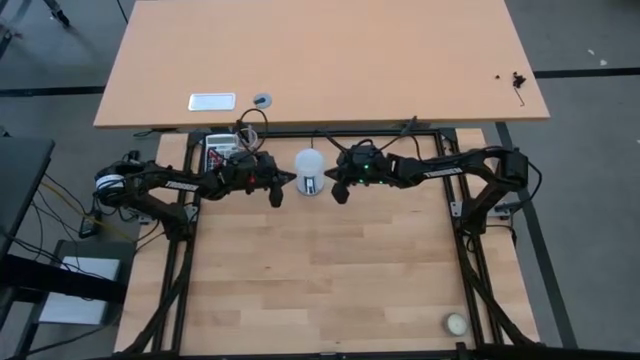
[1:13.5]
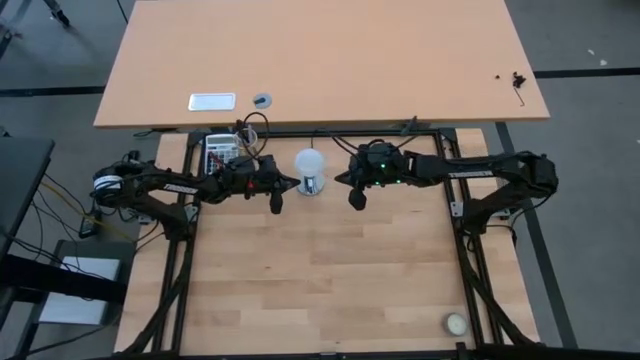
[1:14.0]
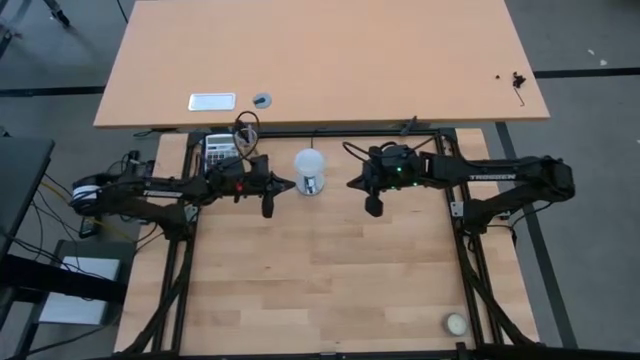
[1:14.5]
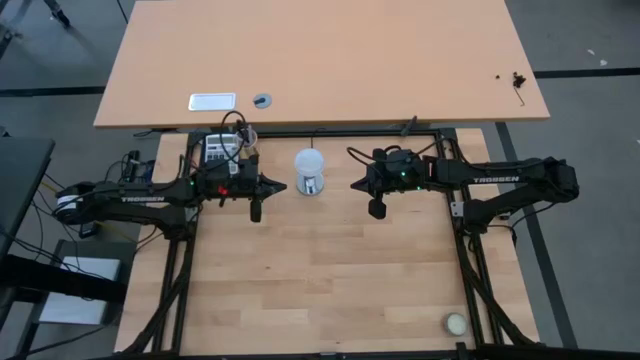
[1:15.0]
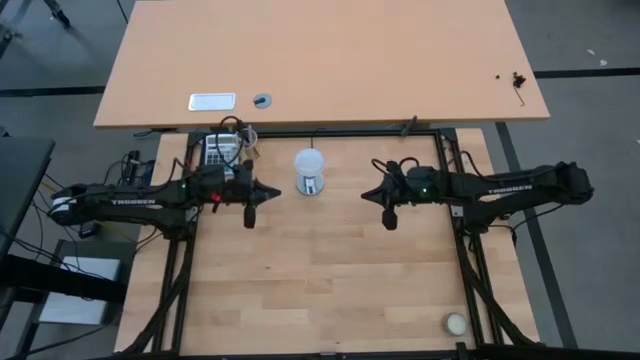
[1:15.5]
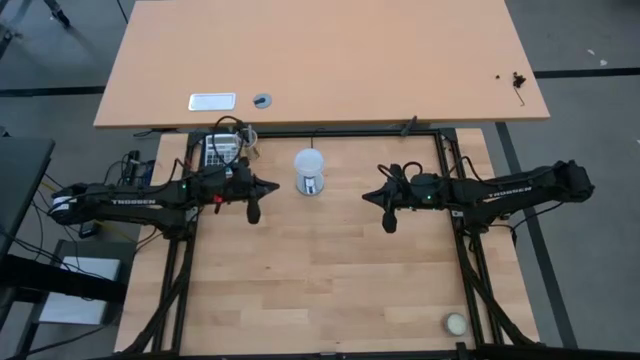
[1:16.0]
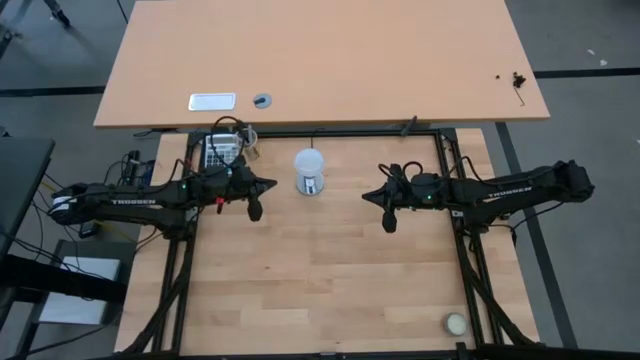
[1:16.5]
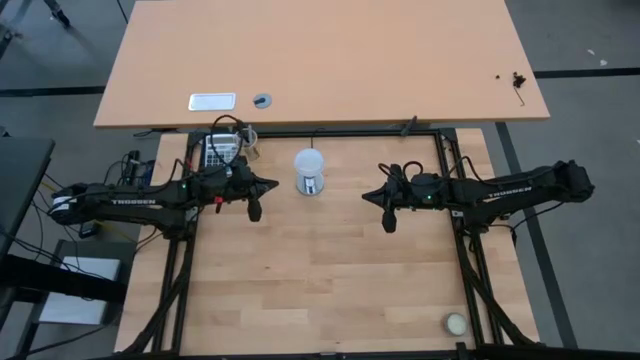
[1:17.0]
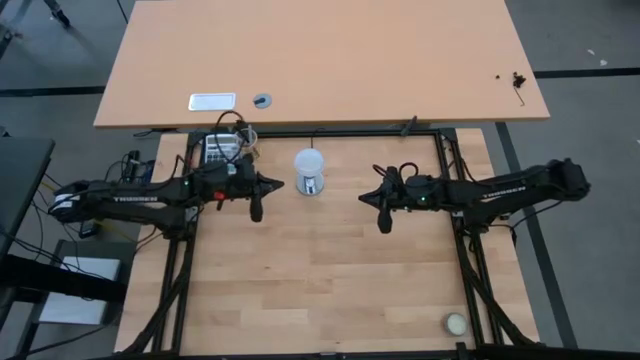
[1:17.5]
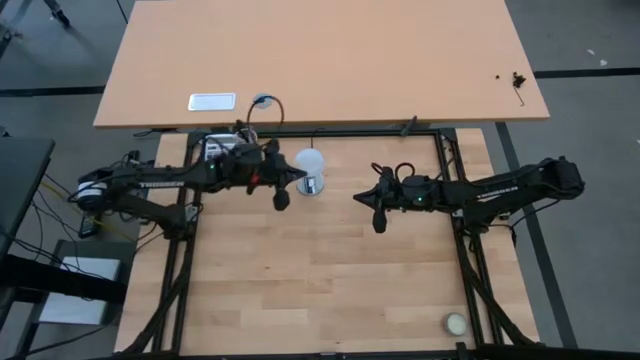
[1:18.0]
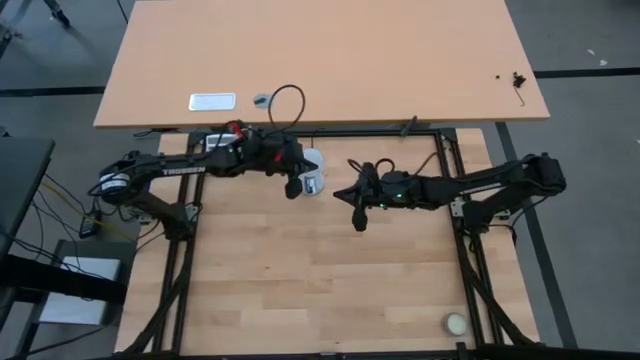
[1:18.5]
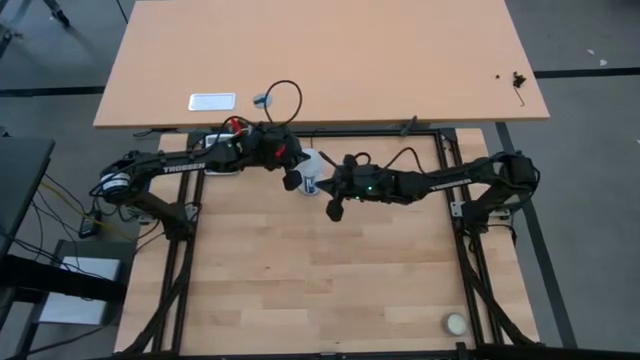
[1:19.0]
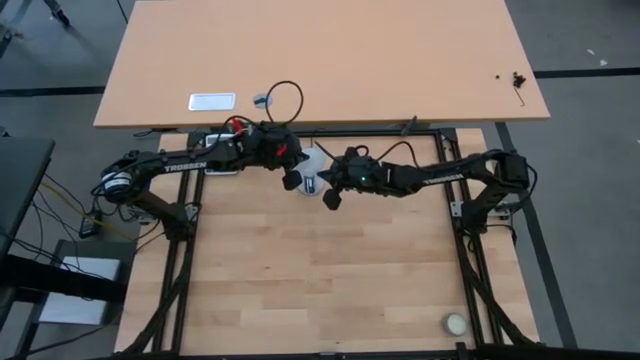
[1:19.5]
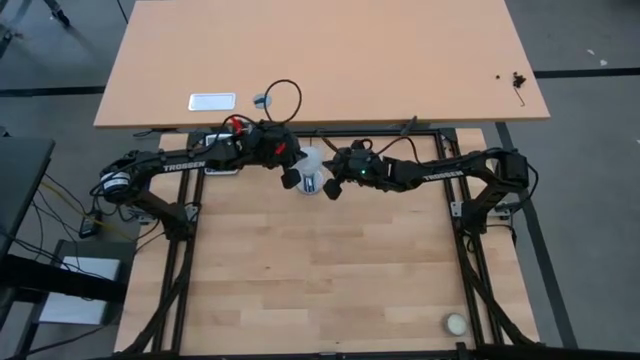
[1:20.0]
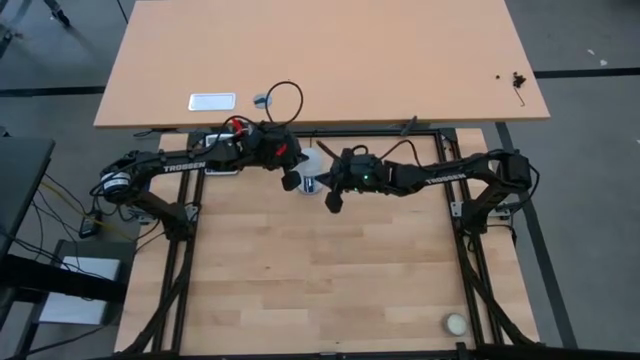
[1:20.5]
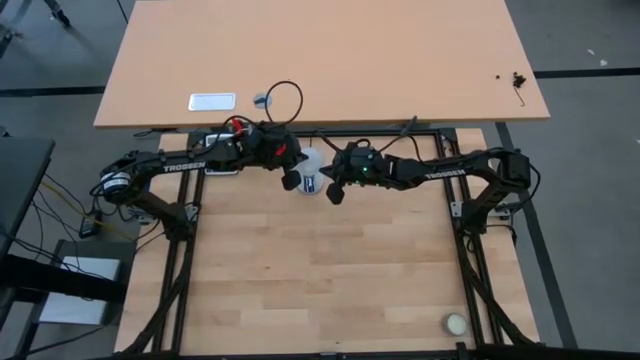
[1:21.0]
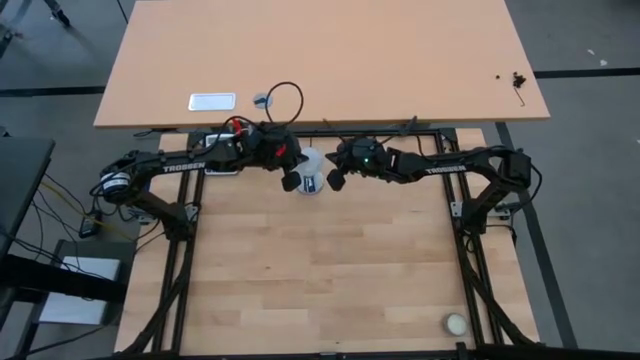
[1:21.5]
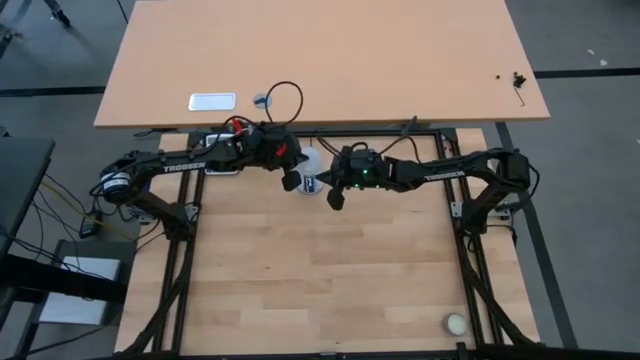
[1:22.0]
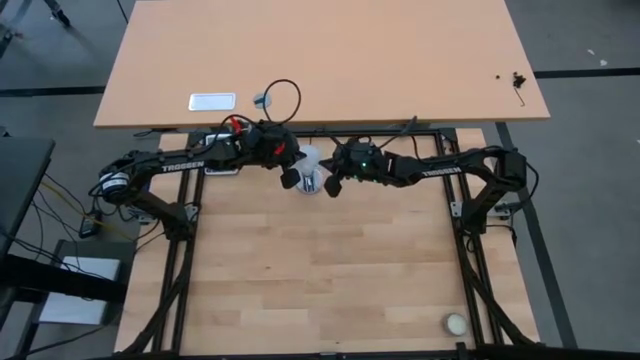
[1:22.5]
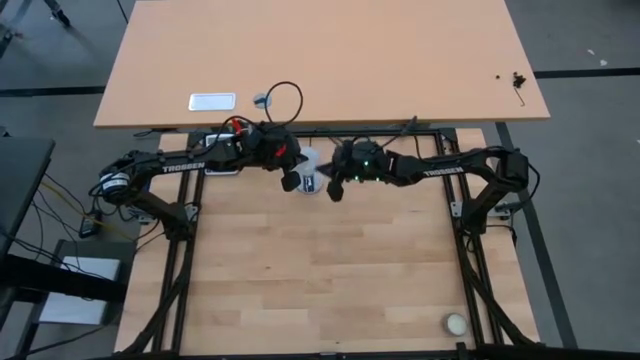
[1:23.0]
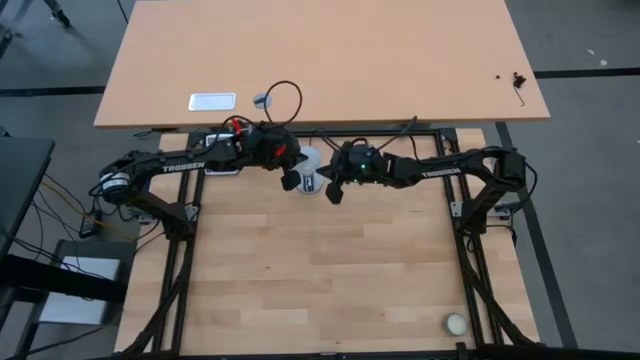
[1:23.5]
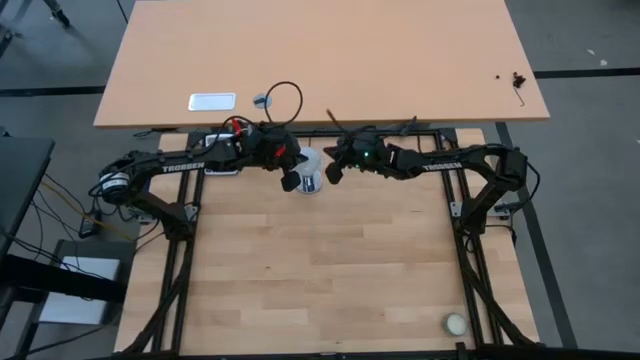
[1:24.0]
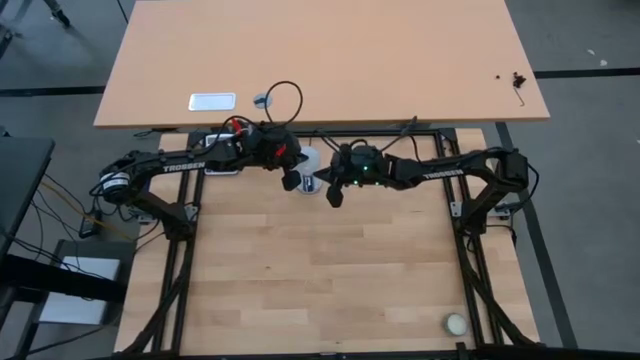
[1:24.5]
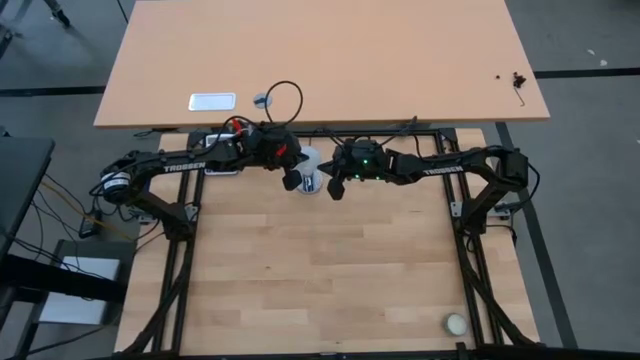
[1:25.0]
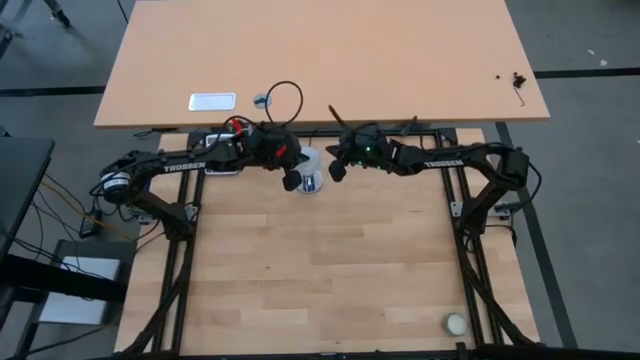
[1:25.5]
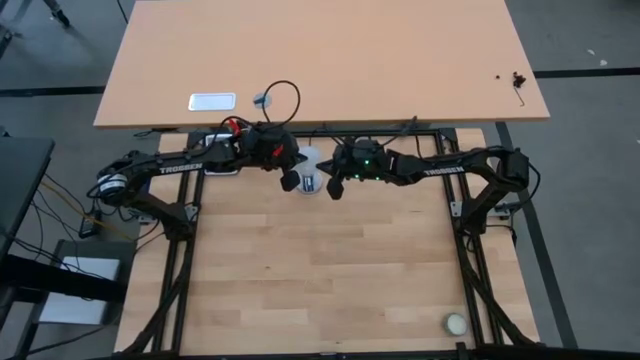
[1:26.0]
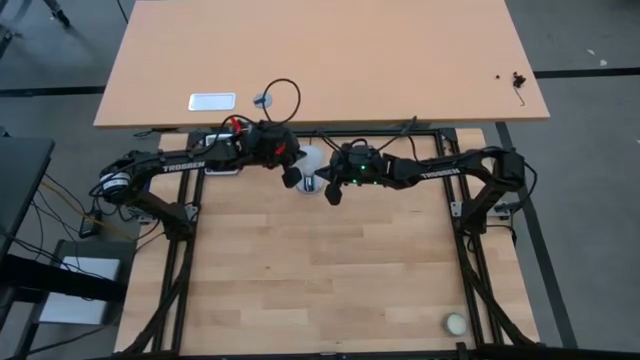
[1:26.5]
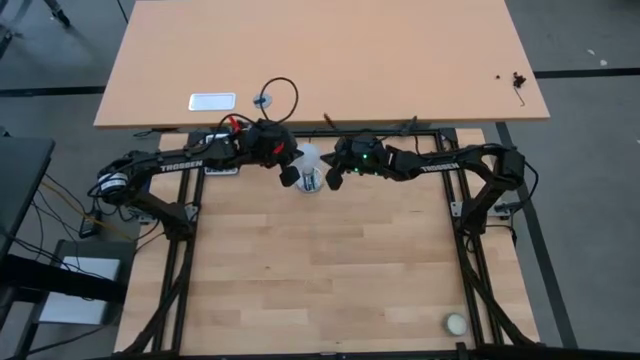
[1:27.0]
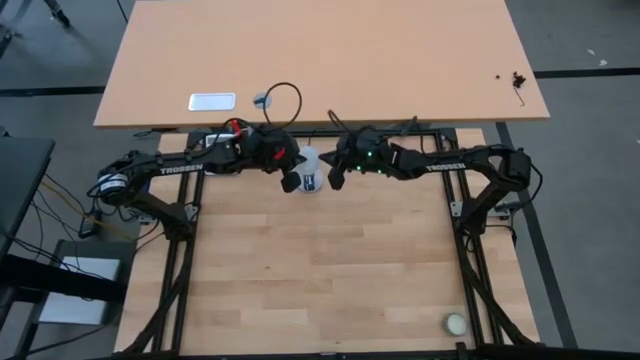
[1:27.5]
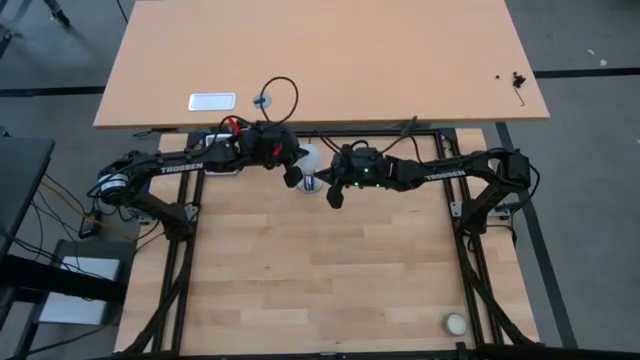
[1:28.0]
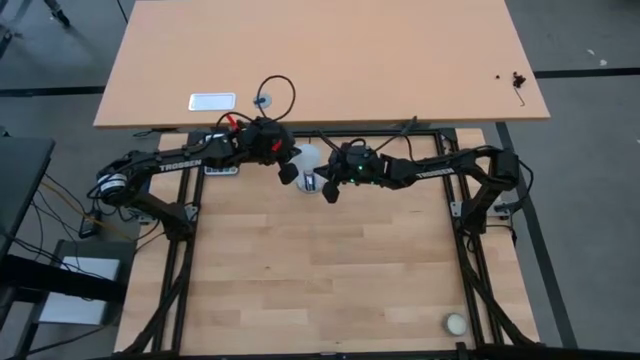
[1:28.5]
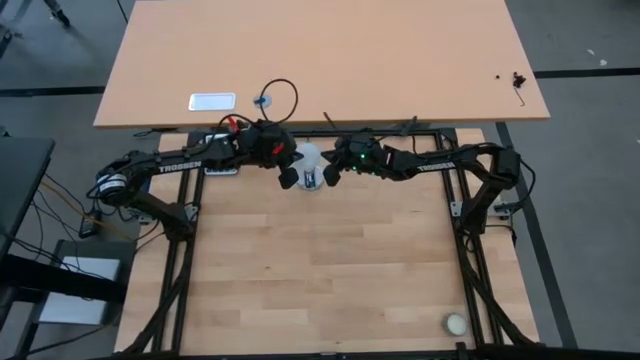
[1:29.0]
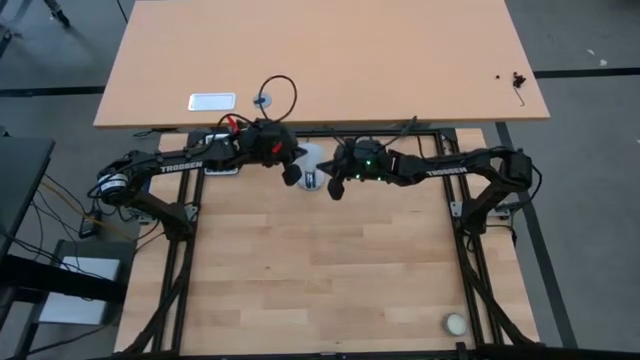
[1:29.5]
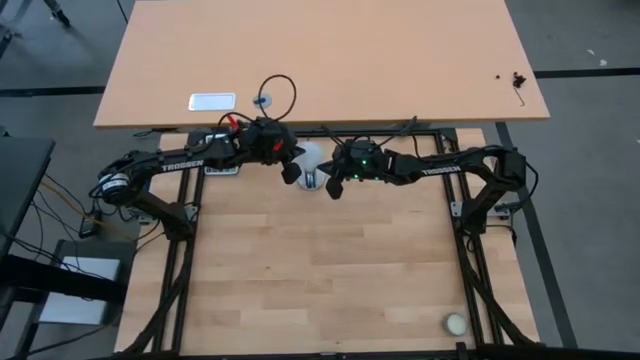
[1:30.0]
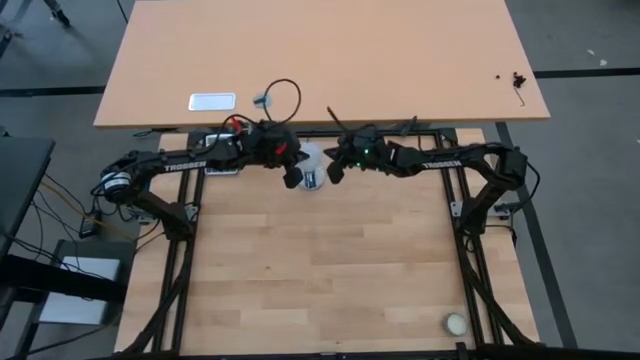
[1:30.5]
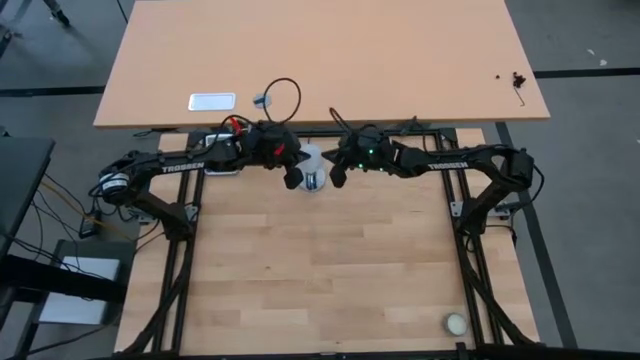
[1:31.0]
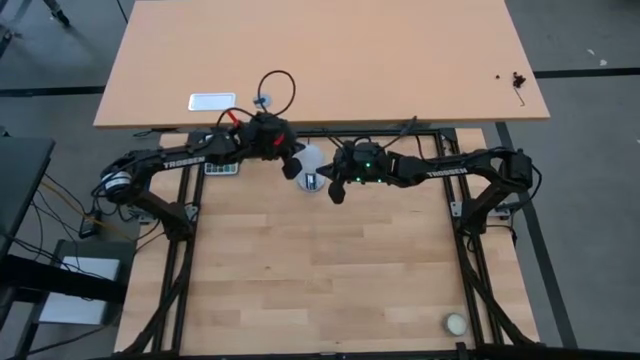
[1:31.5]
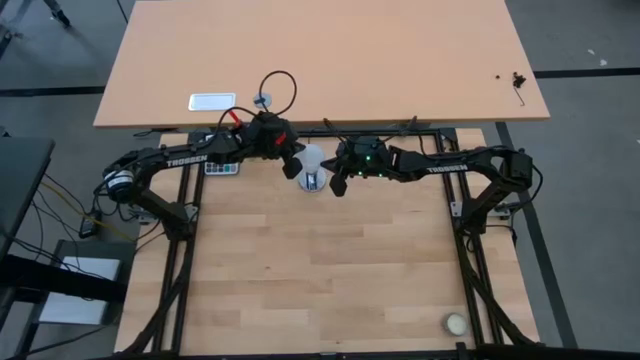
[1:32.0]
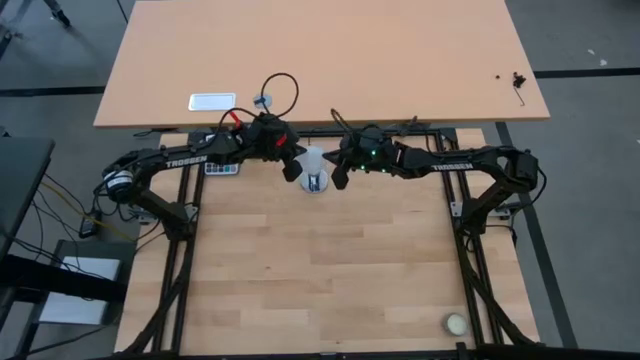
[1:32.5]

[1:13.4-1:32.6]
Task: Screw lightbulb
Remove the white lightbulb from the silver lamp

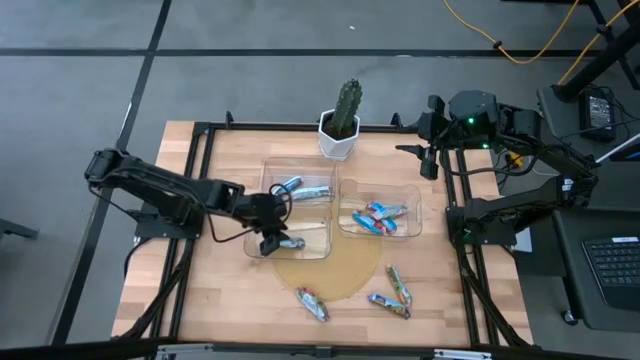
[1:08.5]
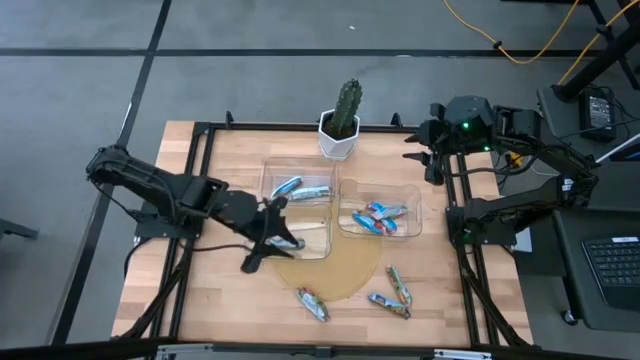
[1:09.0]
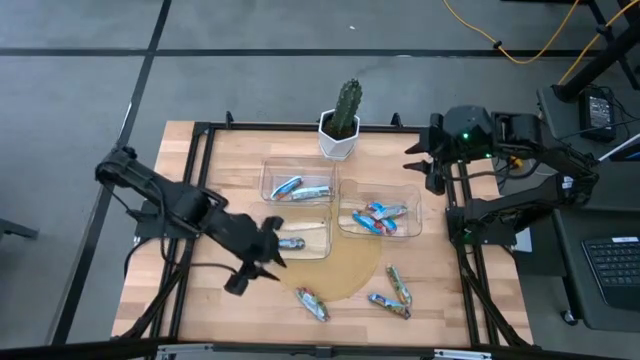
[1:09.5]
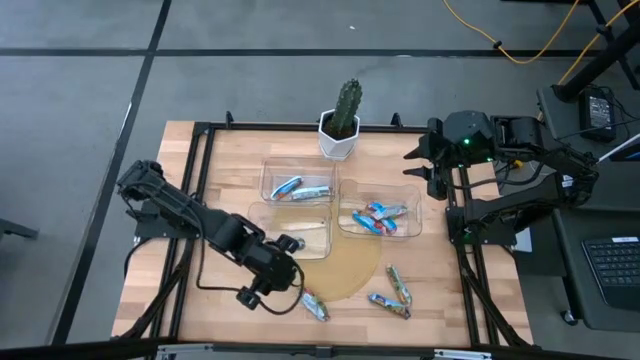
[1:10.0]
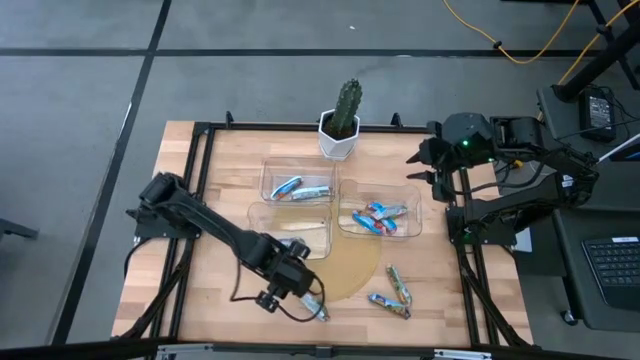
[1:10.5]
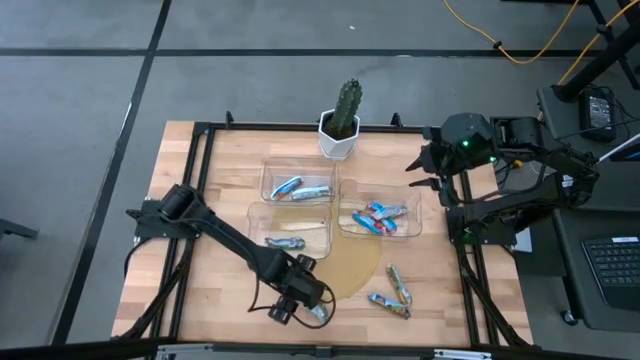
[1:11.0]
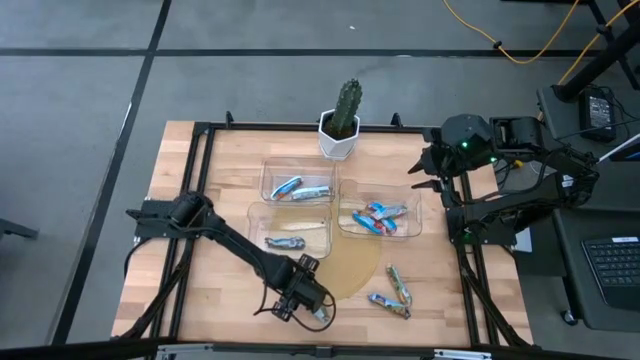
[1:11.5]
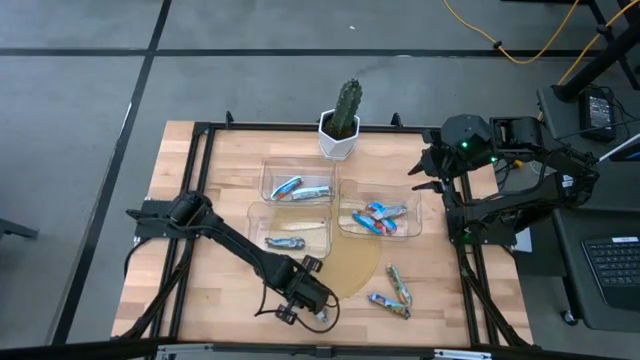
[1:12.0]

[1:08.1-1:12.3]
Task: Pick and place Granola Bars by type
Put the red granola bar into the right bin
